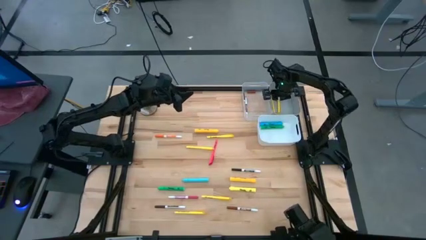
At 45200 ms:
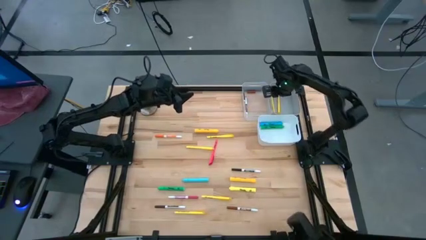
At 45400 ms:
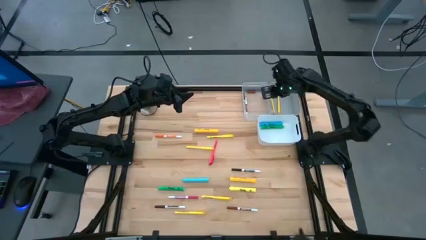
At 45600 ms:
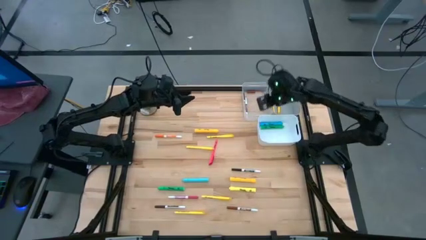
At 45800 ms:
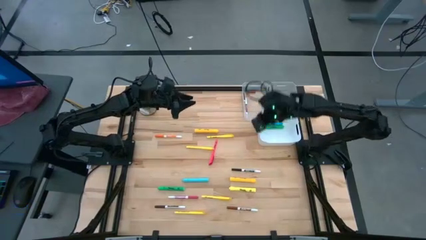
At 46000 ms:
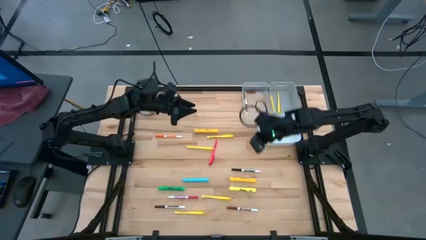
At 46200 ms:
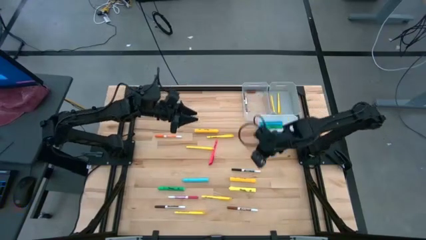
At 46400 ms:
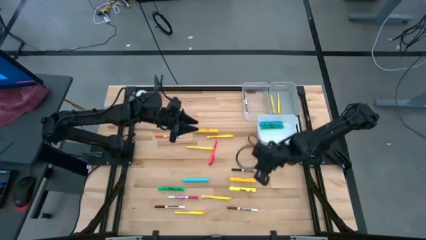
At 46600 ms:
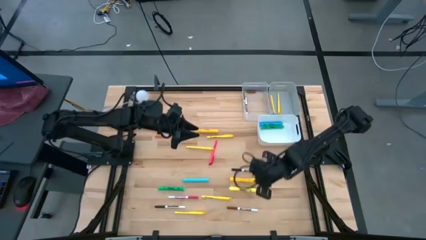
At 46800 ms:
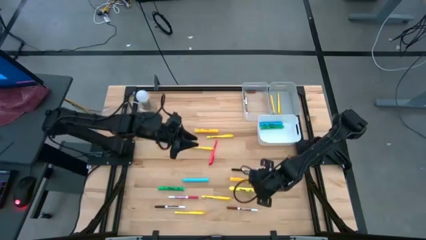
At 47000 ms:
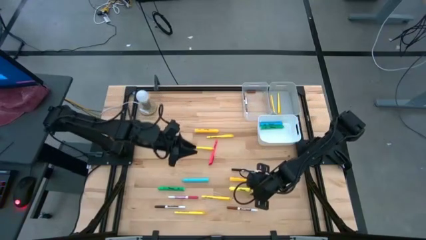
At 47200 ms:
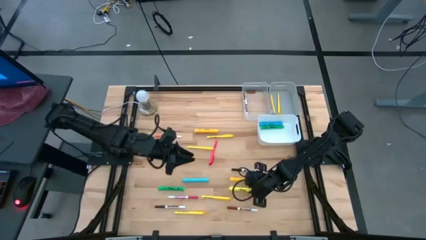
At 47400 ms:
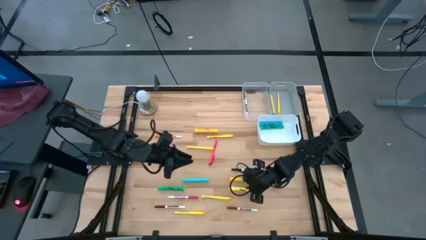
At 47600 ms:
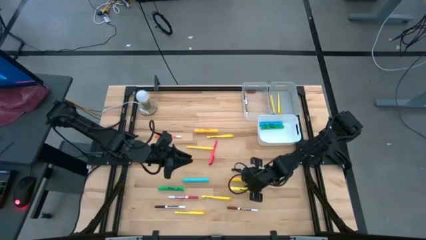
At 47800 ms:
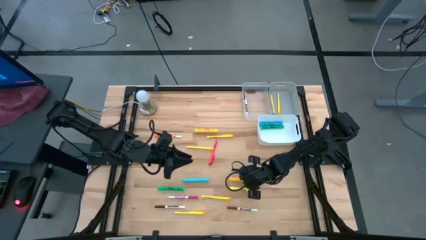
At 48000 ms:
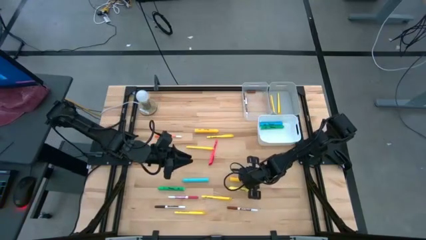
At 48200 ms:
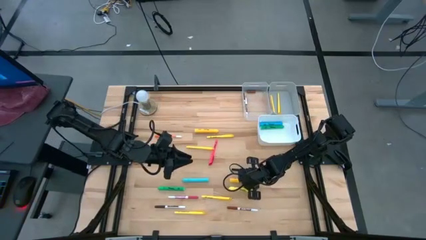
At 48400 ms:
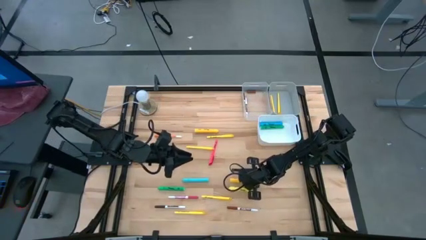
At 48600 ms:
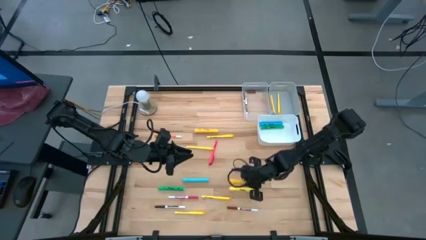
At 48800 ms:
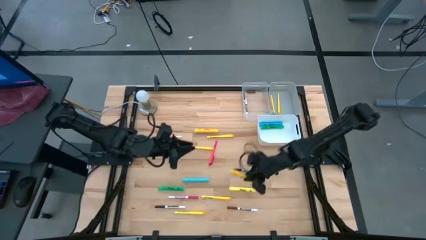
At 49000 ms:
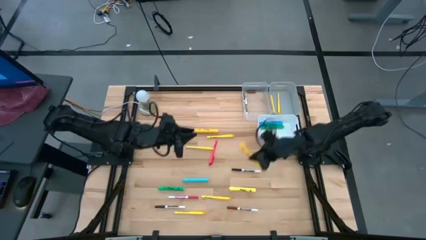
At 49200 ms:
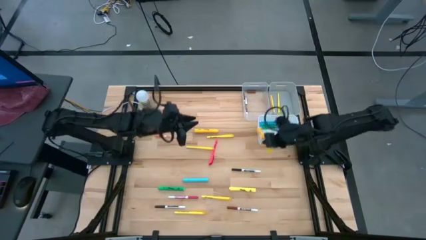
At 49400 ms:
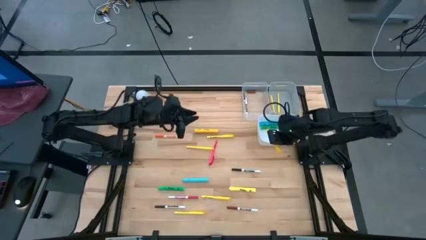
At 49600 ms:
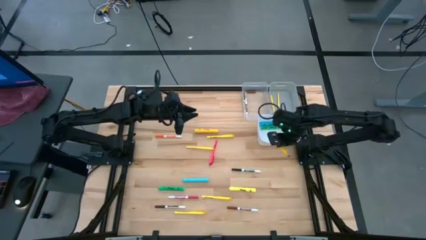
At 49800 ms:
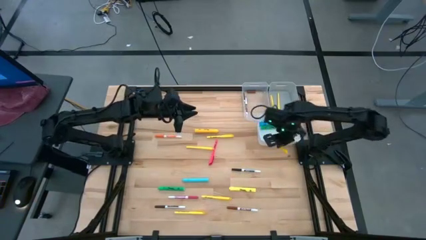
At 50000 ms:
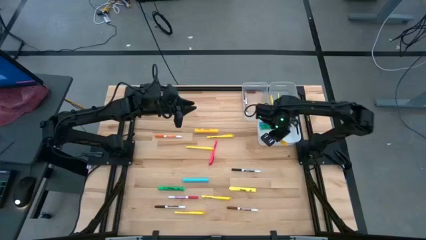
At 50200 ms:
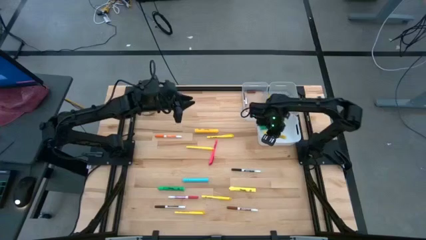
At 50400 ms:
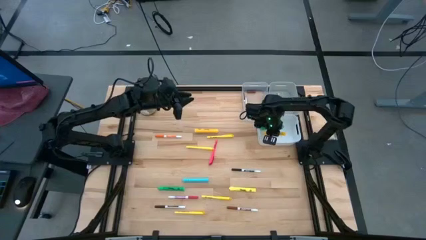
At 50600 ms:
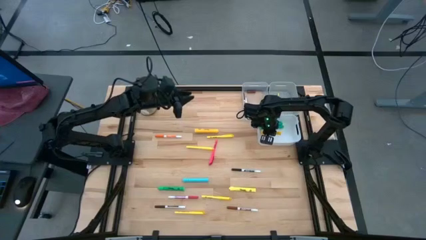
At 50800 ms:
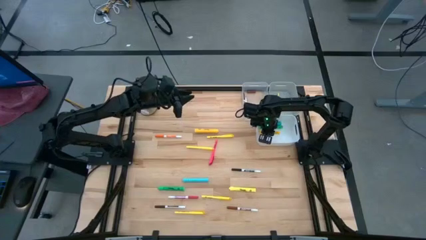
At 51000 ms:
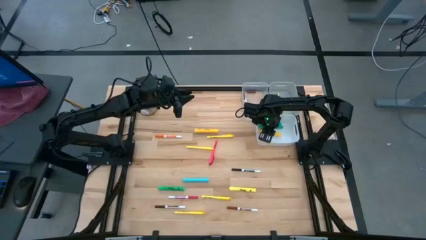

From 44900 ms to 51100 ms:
Task: Pick & Place Markers
Put the dark yellow highlighter pen into the white bin

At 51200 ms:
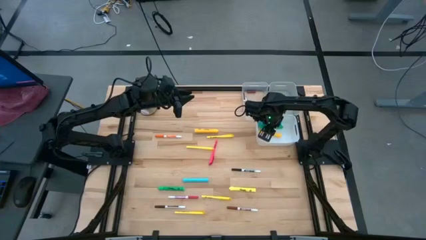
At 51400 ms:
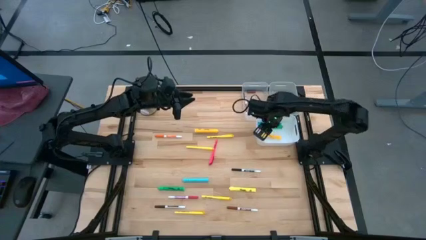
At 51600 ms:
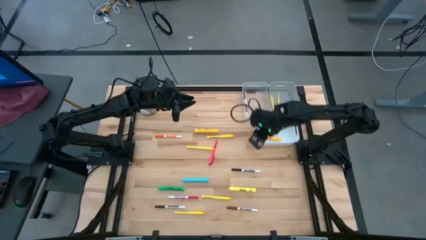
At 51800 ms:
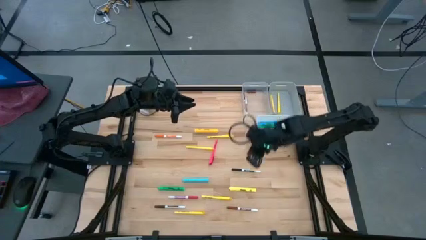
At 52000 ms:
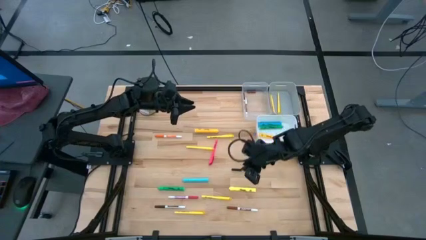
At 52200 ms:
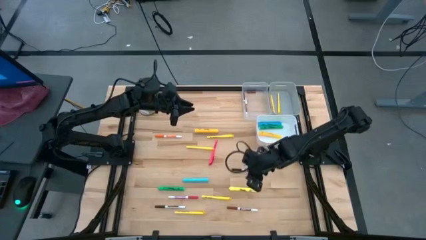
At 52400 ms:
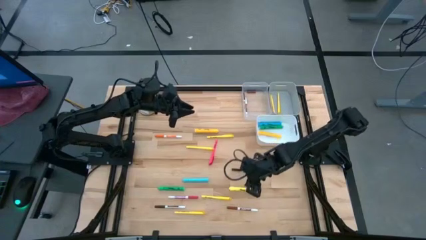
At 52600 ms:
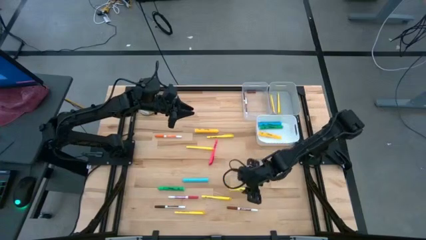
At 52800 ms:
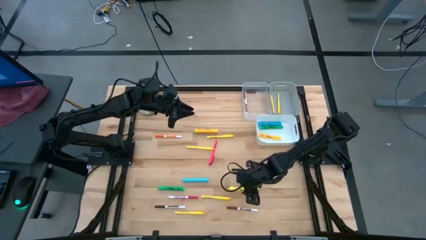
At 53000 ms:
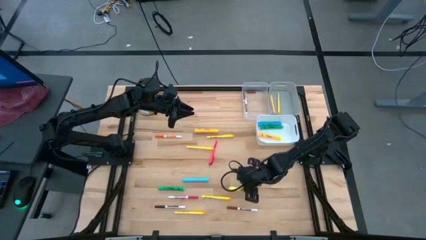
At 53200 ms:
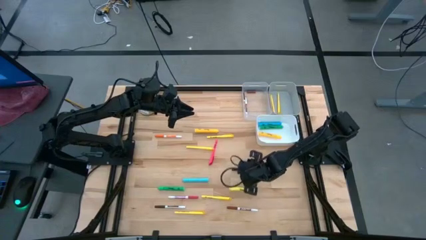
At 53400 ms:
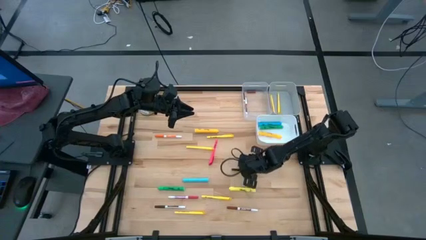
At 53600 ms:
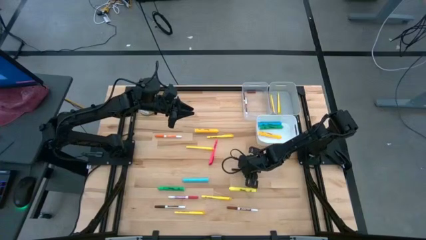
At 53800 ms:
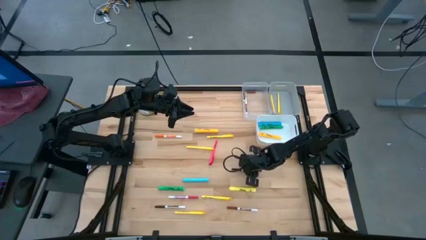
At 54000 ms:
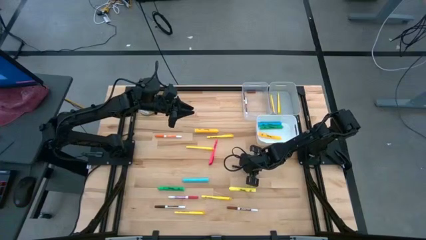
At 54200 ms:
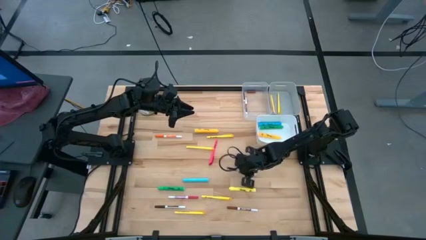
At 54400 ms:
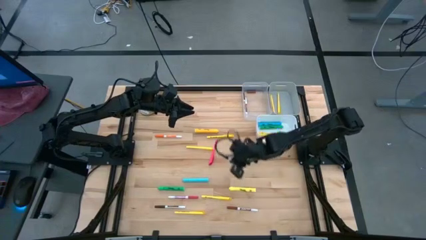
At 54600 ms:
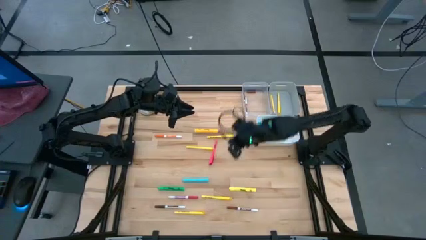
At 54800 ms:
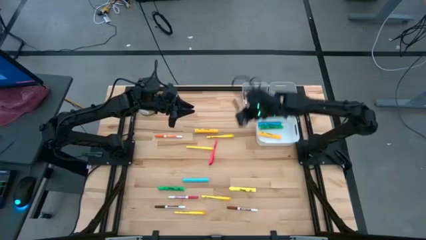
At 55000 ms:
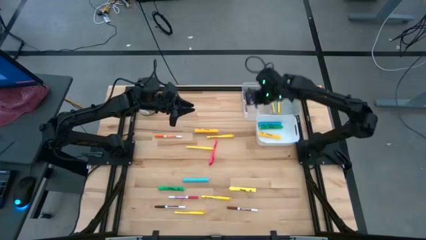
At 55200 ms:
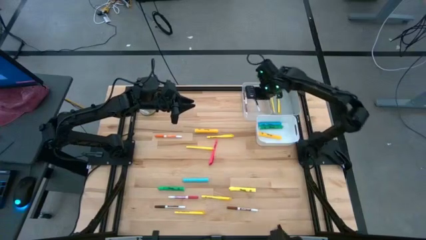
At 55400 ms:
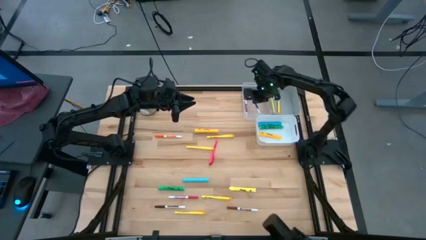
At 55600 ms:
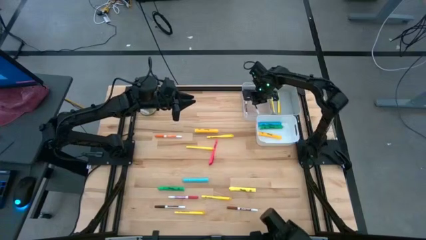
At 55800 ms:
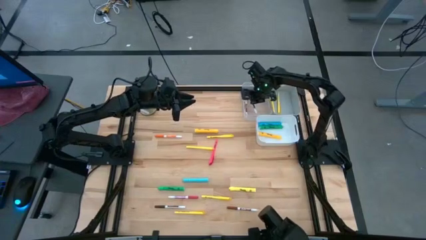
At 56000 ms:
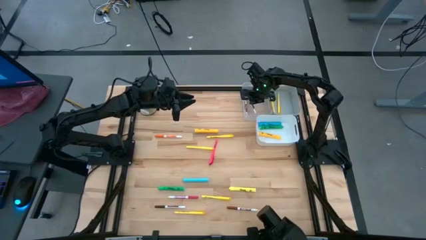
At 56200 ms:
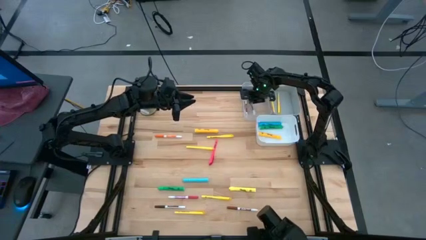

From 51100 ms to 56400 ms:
Put the black marker pen into the transparent bin

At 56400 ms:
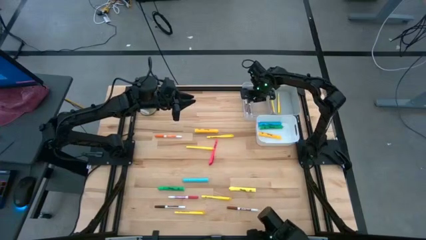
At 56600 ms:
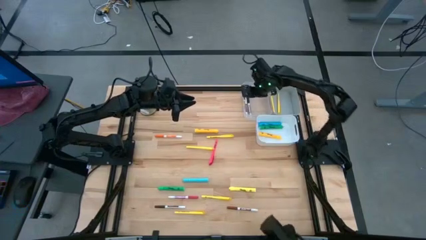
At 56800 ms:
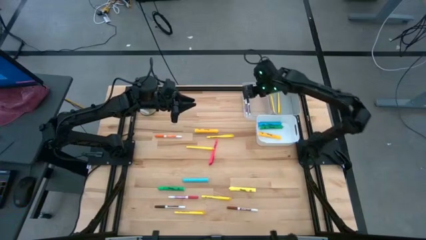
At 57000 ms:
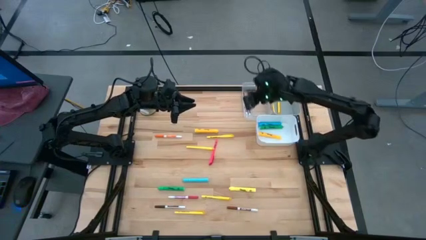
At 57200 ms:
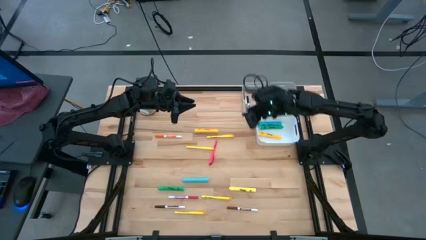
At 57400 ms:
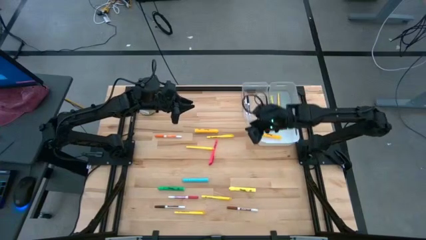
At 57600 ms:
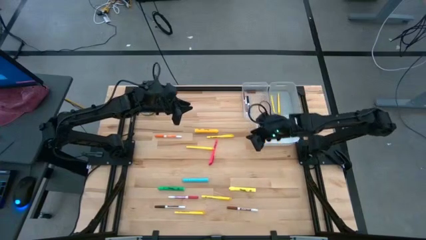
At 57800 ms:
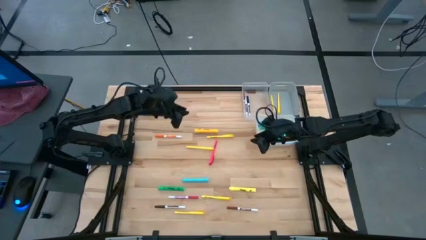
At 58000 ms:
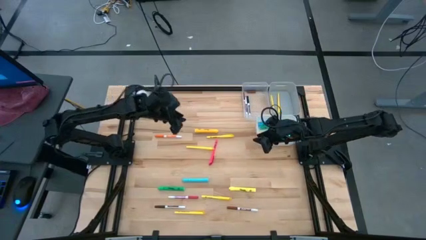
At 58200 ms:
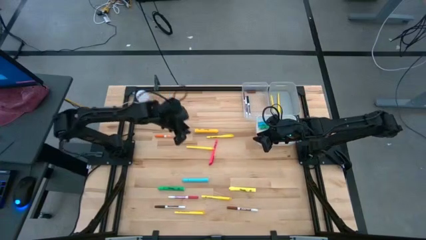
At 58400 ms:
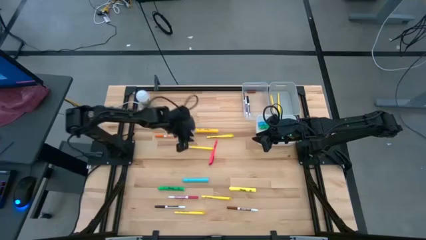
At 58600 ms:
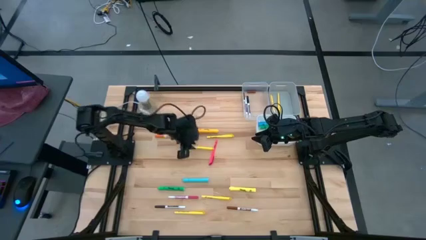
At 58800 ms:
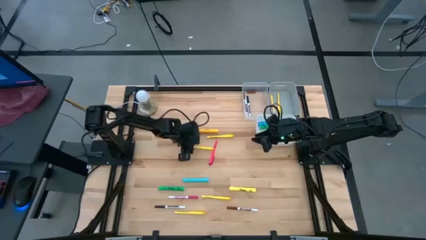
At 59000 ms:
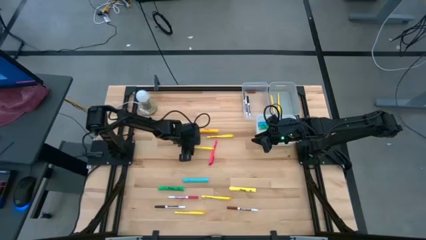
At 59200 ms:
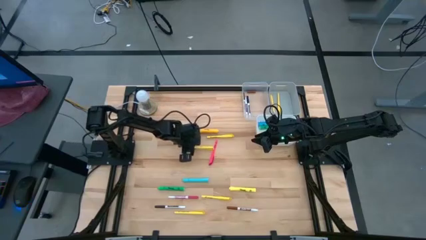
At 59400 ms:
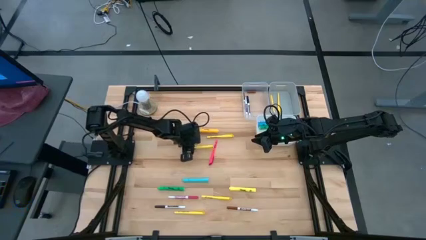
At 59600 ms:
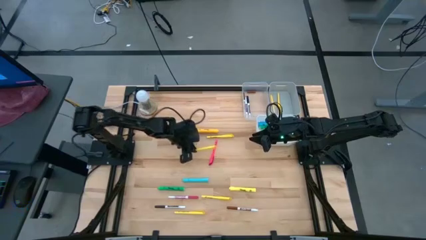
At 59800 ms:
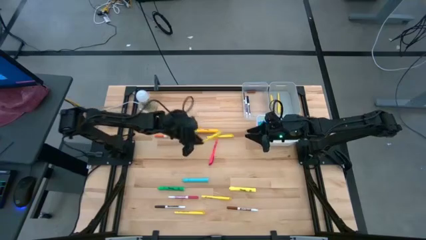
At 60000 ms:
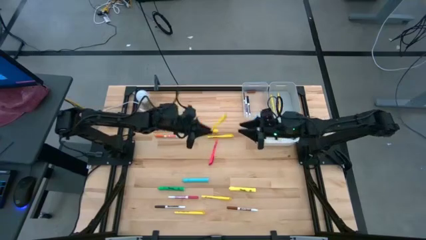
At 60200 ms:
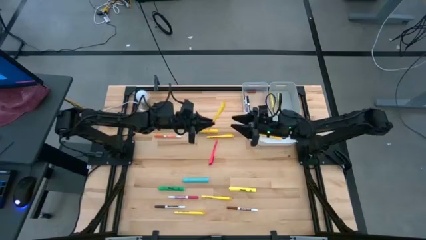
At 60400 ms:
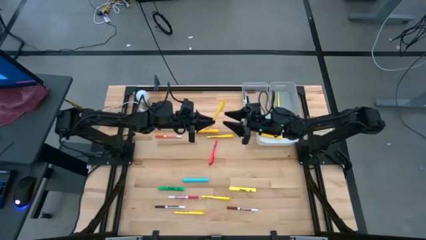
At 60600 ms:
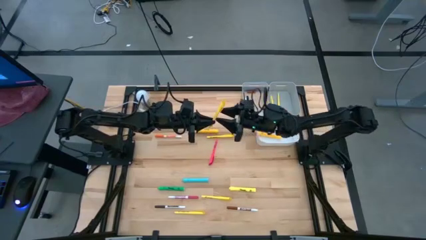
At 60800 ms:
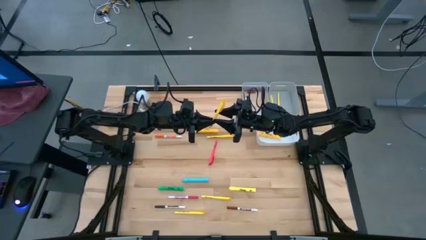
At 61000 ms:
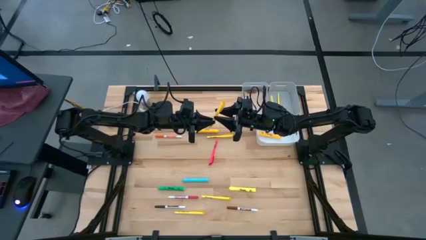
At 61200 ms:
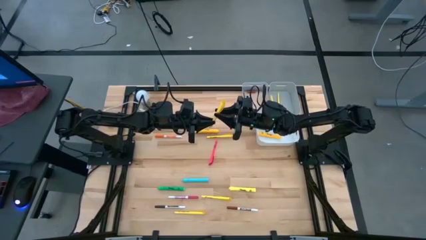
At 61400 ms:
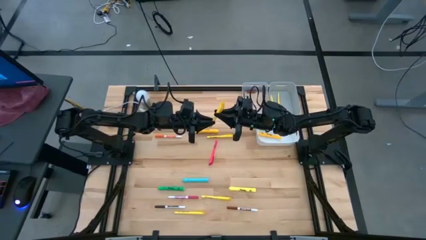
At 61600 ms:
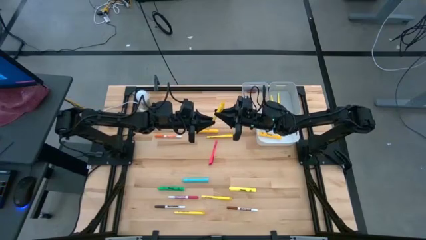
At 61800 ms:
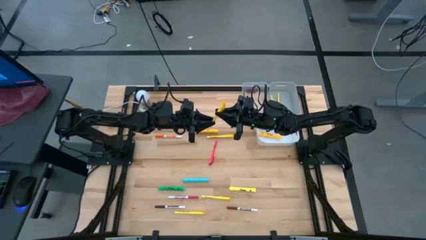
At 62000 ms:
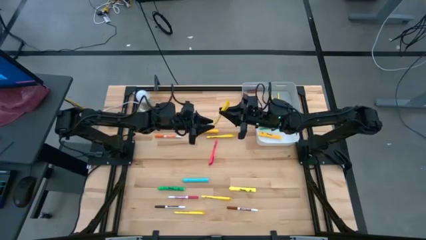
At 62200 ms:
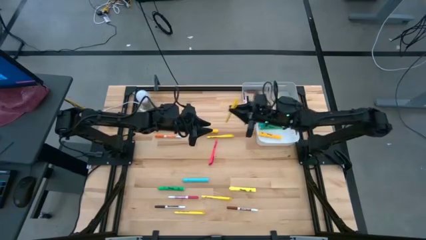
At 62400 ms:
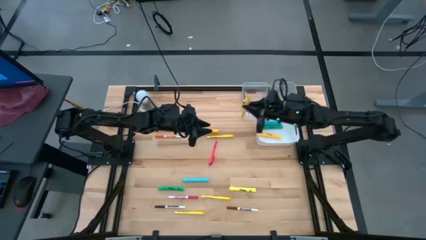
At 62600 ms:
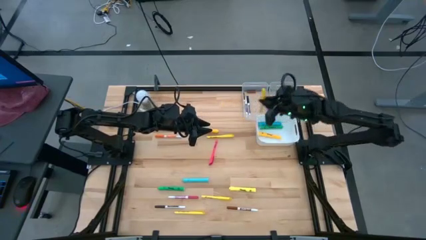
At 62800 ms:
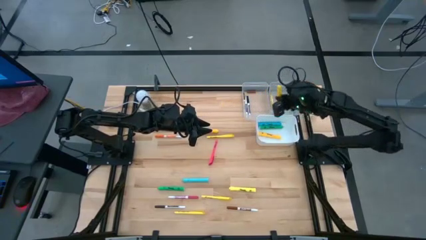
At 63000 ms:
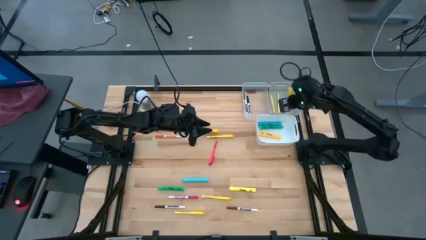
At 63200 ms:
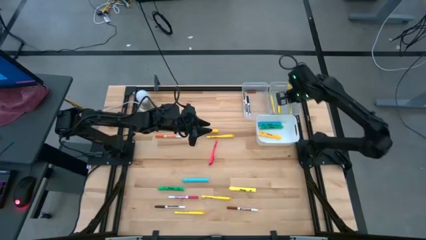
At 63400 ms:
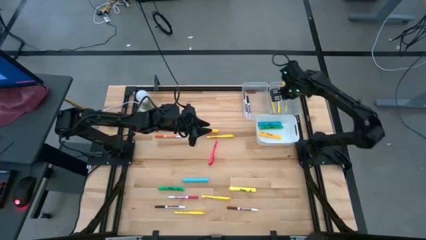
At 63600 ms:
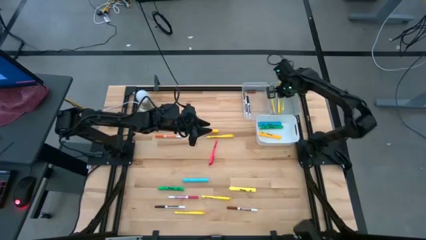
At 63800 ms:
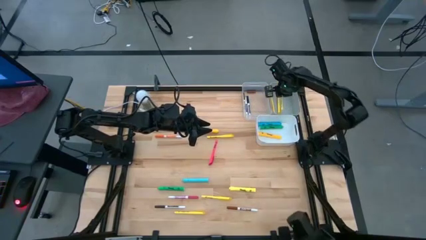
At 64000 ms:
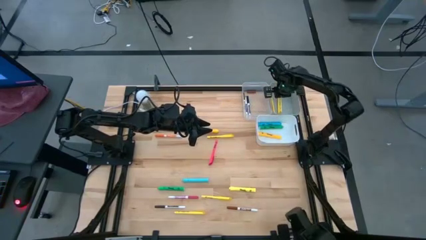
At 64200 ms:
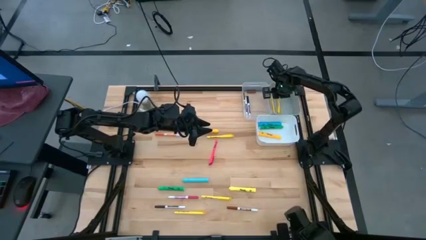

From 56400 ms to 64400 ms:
Put the yellow pen into the gray bin
